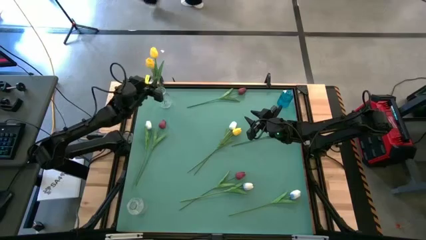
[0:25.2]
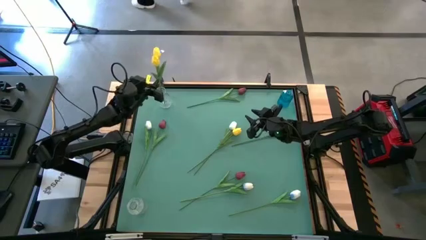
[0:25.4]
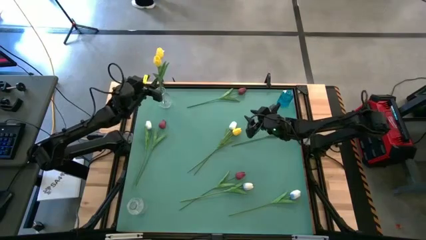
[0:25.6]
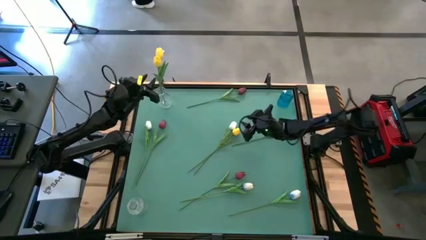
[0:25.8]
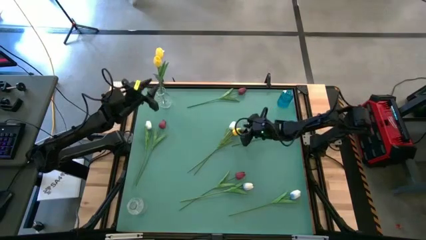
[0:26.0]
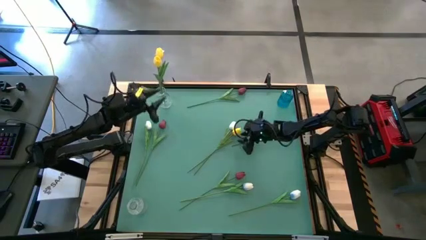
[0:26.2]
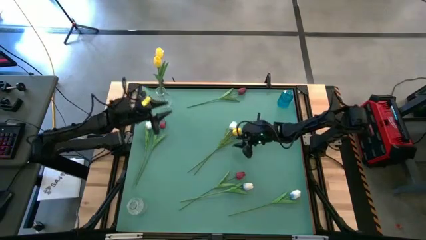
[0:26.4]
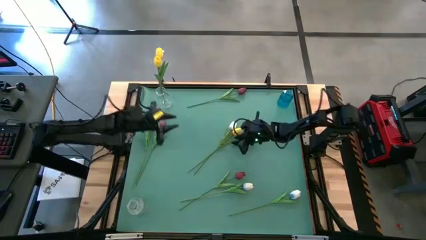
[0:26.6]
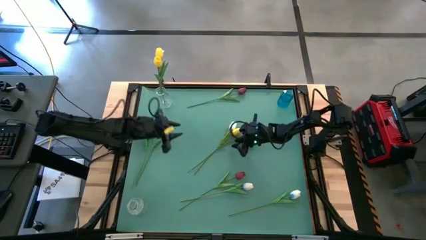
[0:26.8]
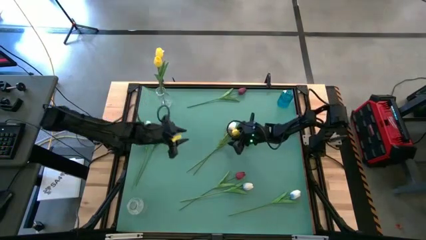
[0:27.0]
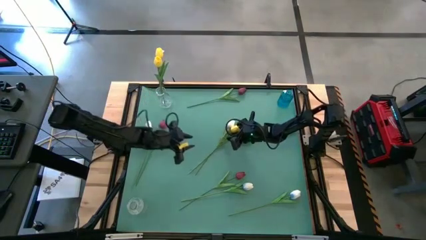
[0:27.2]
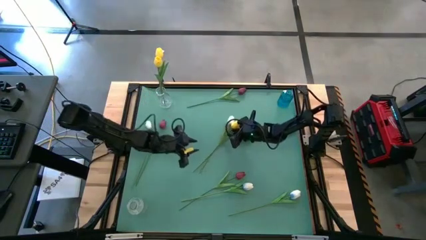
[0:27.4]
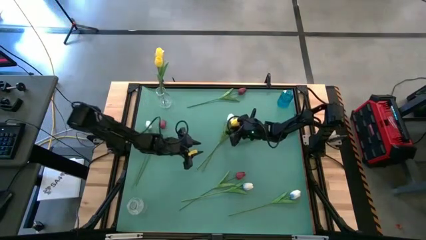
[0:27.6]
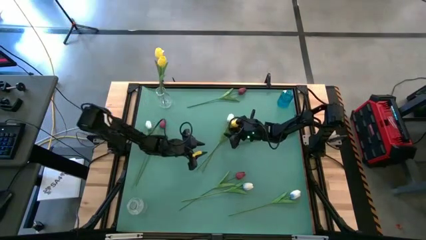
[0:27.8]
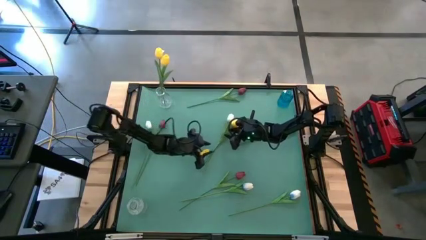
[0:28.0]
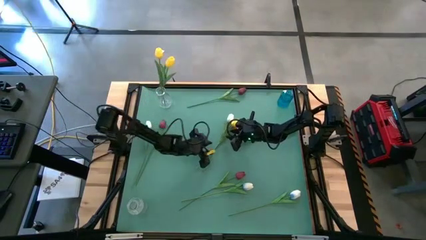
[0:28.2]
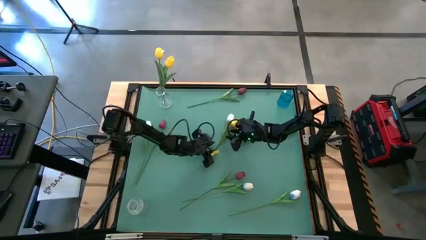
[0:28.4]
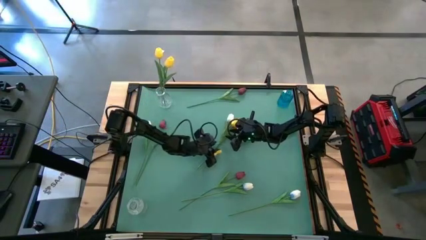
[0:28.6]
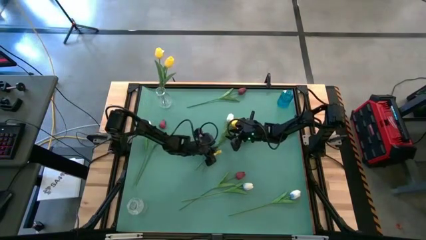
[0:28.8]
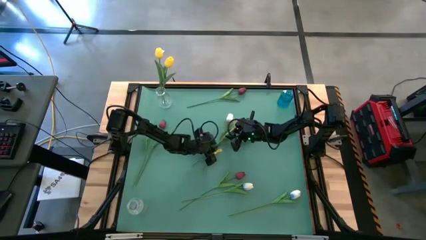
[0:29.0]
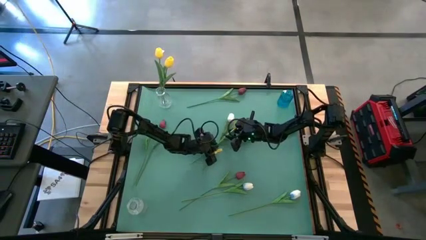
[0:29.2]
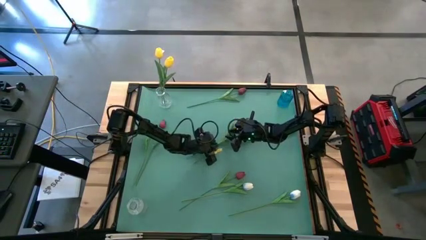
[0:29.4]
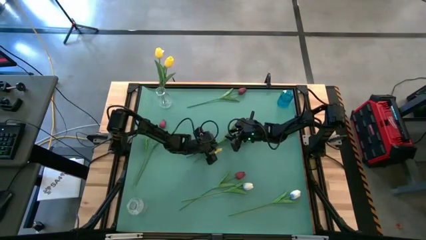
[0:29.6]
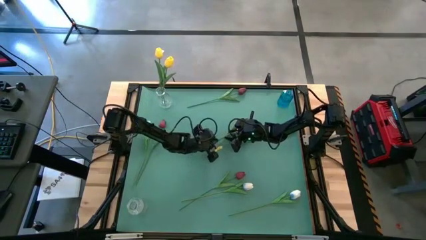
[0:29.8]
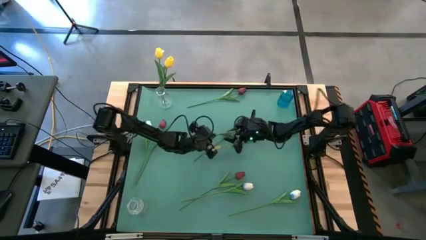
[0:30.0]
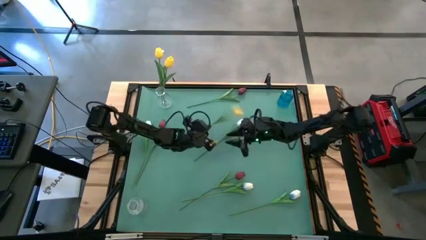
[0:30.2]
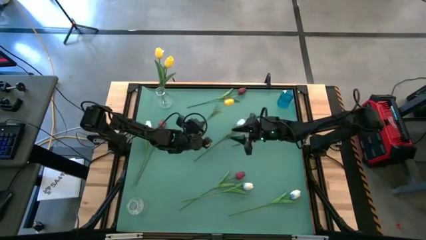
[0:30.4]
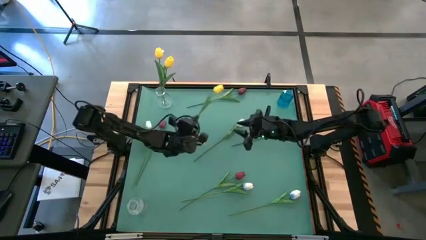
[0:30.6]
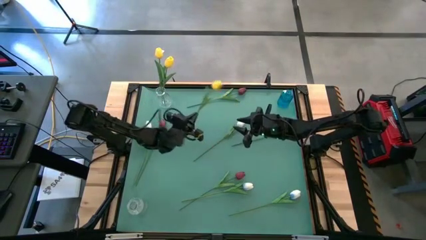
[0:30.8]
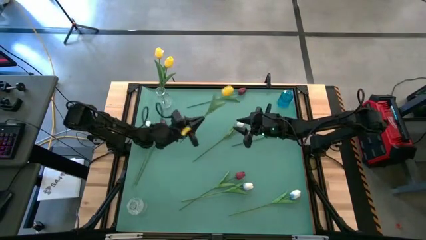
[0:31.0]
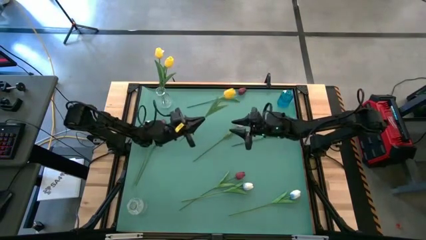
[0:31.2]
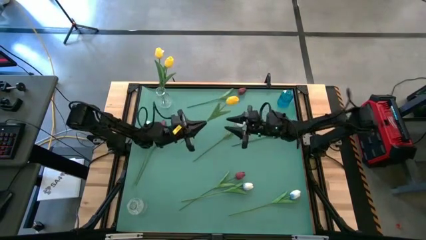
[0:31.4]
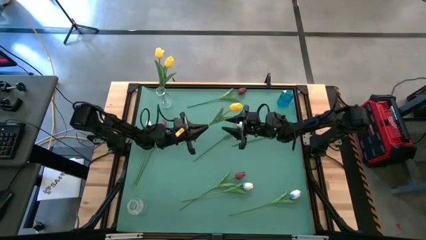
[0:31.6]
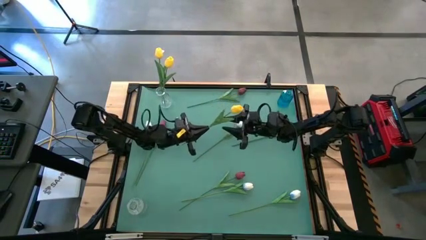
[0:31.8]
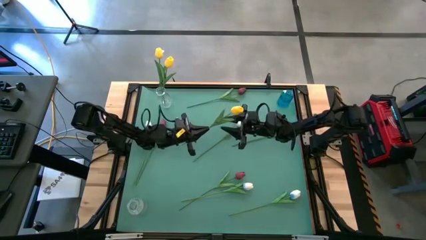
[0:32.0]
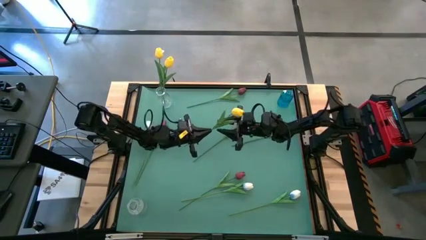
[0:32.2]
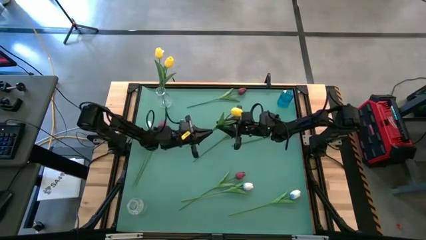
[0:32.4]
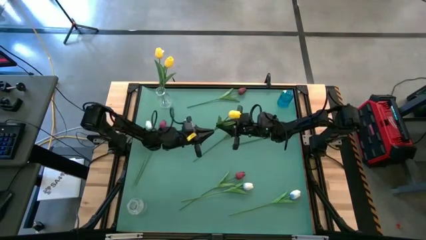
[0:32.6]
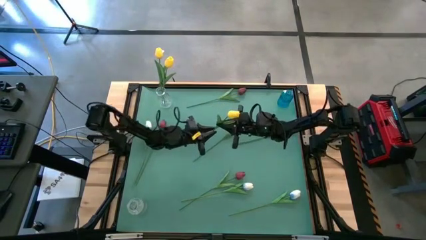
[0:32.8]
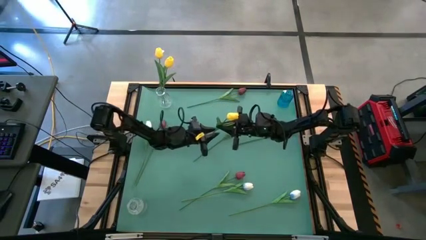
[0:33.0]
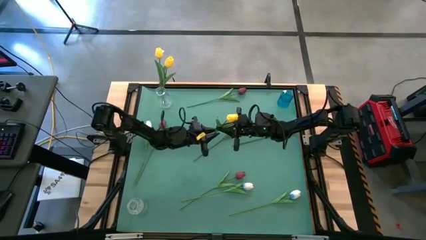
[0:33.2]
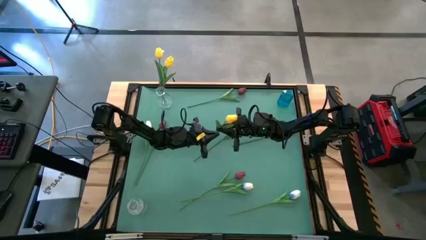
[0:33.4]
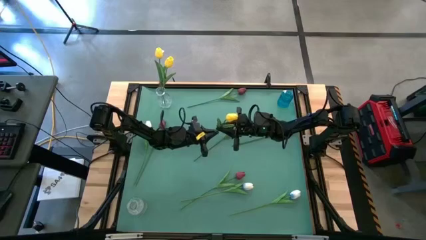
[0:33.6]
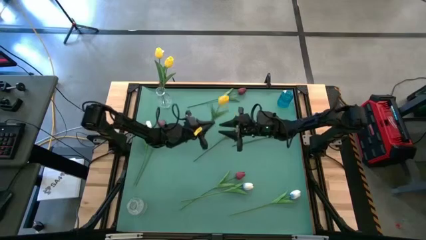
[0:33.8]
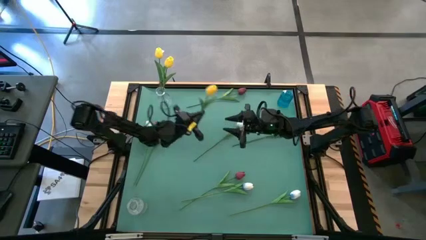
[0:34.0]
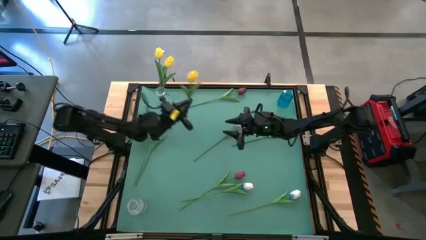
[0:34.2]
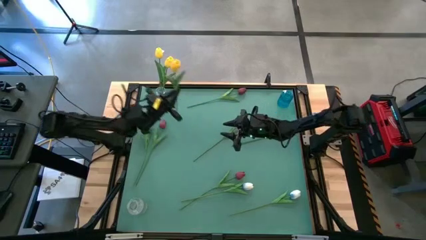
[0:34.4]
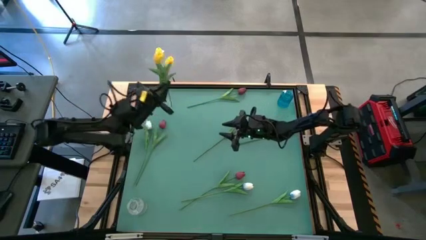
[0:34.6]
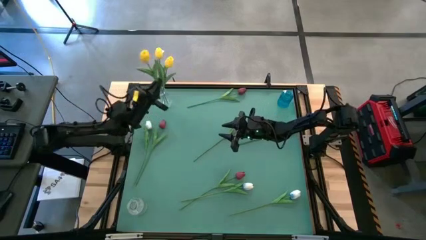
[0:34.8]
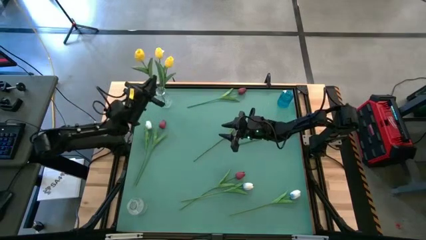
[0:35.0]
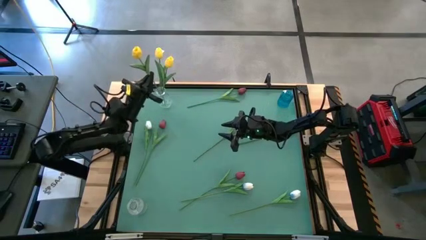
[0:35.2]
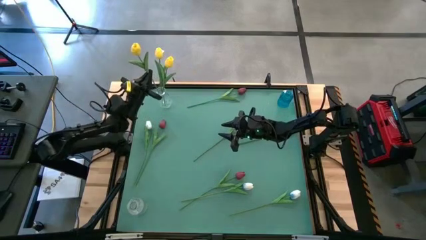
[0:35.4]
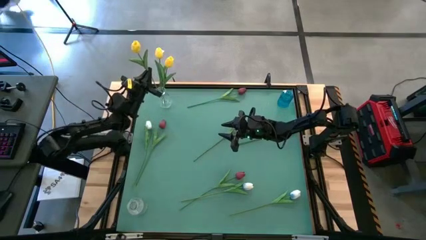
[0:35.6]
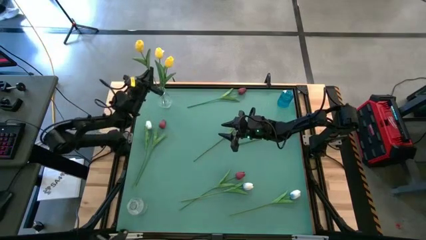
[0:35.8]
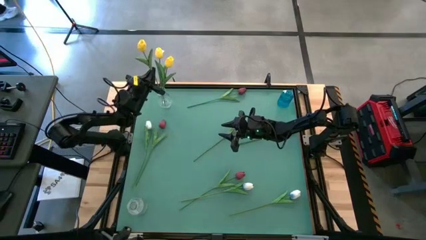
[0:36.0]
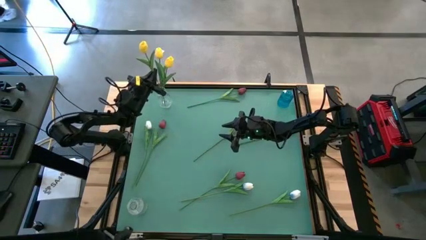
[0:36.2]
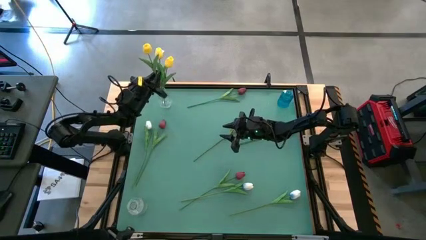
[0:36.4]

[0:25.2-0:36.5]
Task: Sort flowers into vase by color
Put the yellow flower into the top transparent vase

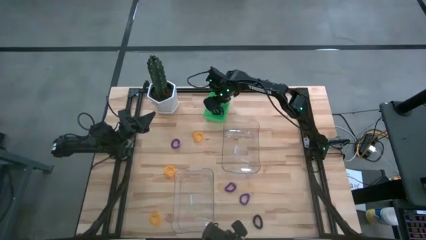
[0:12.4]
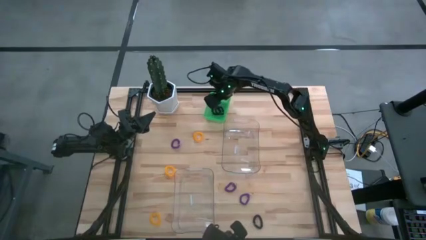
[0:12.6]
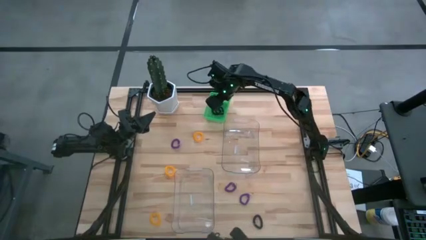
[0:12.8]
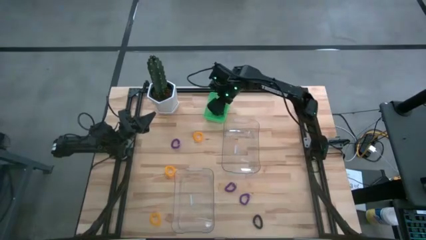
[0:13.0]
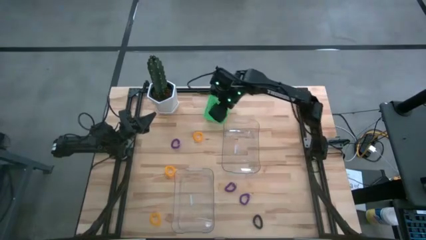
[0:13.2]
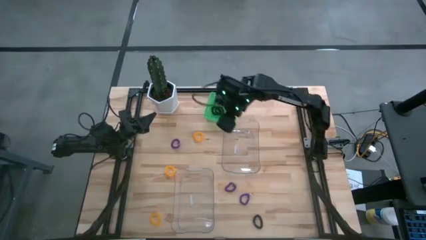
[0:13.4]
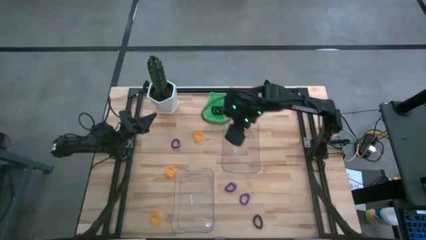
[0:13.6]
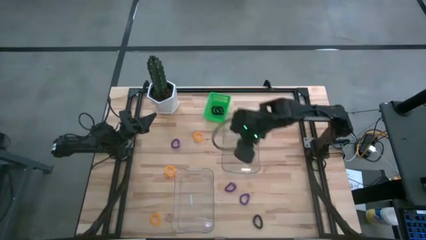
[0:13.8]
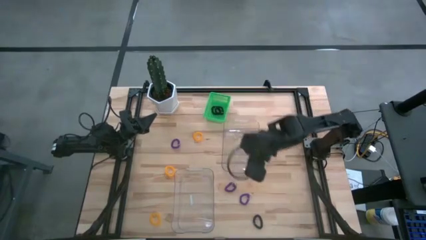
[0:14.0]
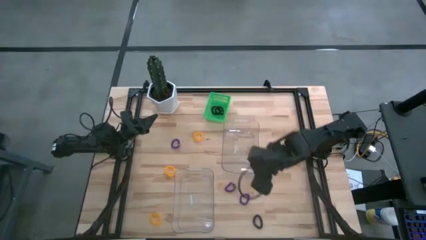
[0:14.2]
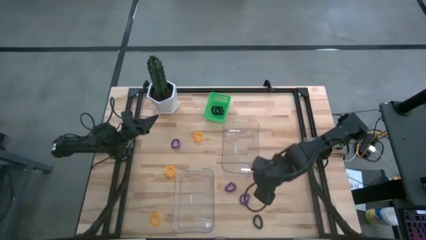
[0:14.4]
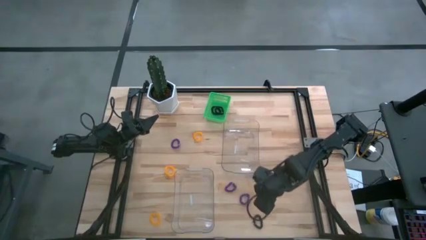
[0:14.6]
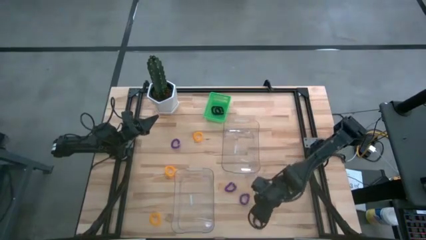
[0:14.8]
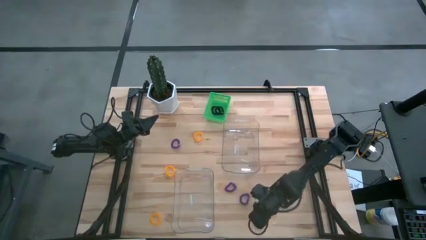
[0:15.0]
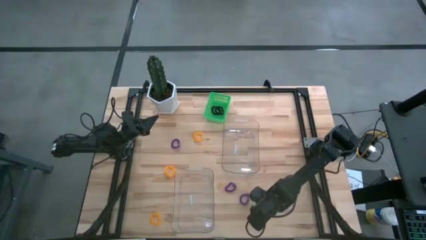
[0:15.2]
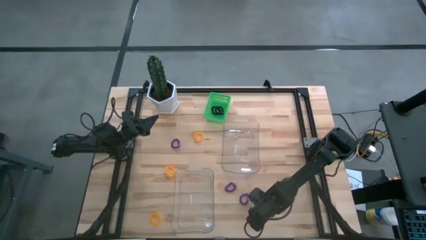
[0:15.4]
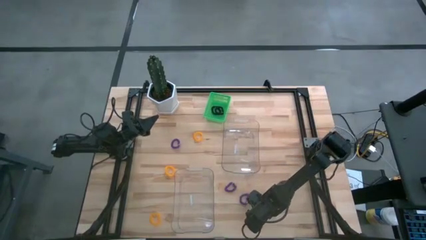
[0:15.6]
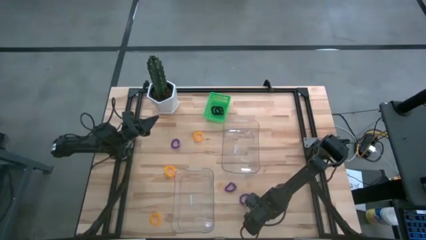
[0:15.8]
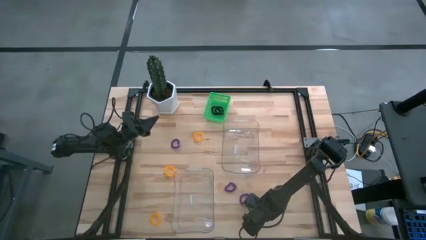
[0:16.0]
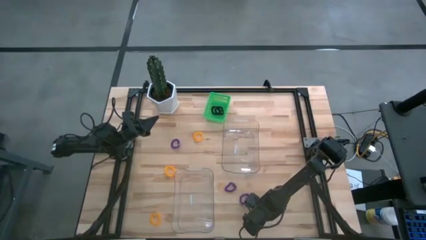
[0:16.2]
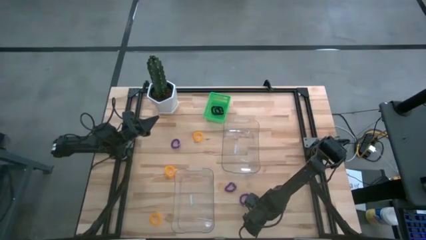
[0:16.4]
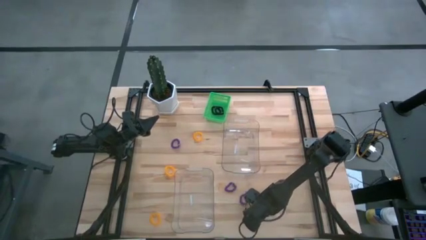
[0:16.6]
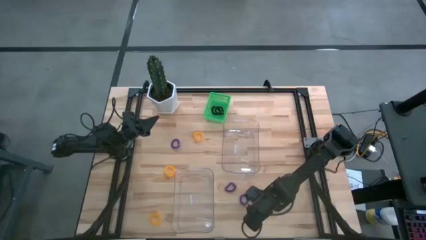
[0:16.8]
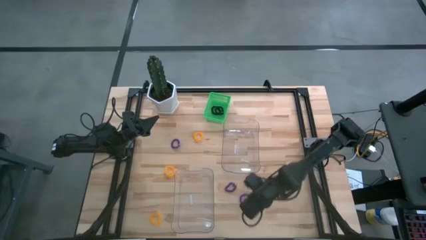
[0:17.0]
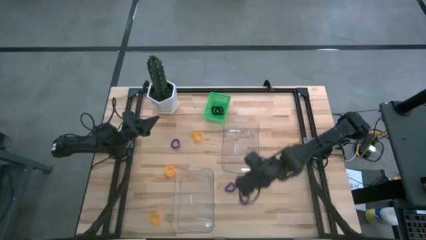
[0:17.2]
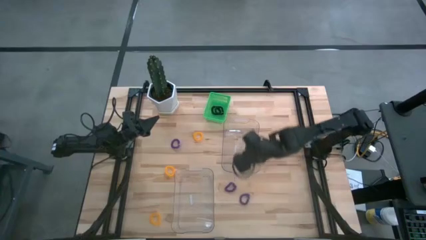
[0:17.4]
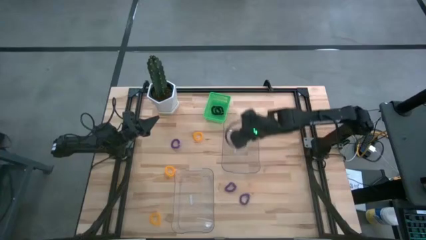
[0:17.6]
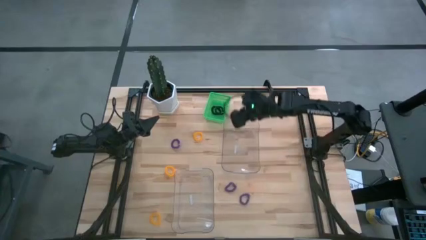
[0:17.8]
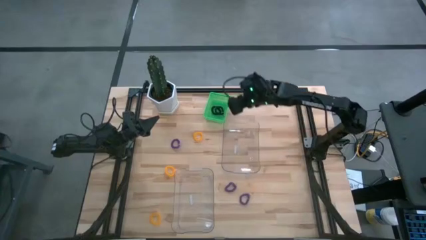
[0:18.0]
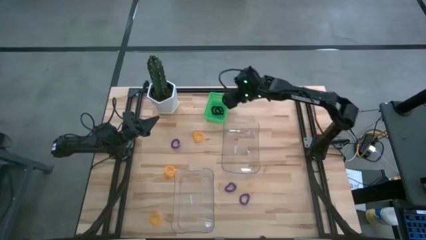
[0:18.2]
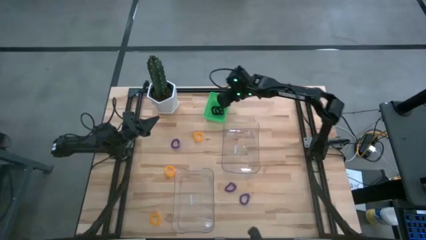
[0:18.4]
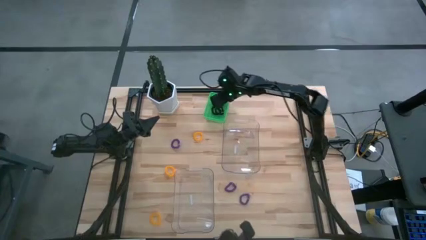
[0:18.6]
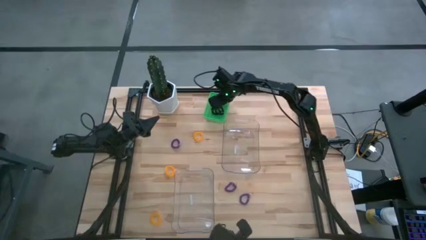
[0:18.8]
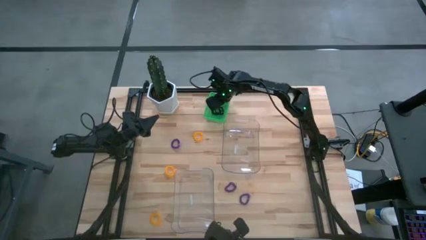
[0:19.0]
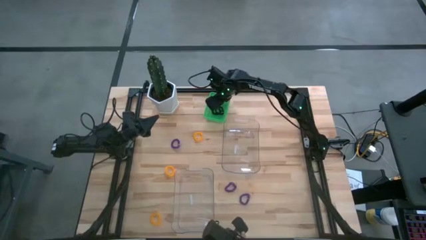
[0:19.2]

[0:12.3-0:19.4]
Task: Sort spring keychains
Put the black spring keychain into the green bin
